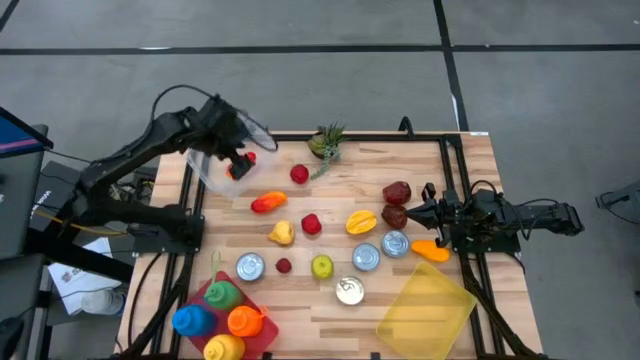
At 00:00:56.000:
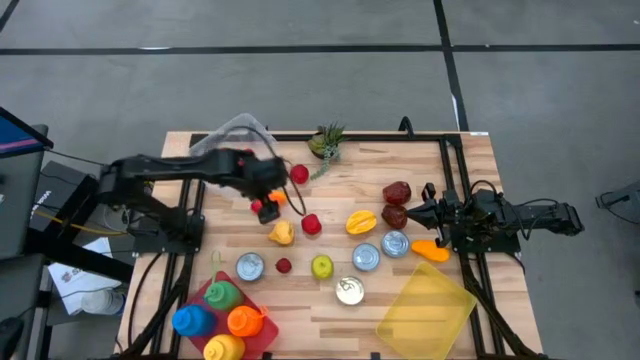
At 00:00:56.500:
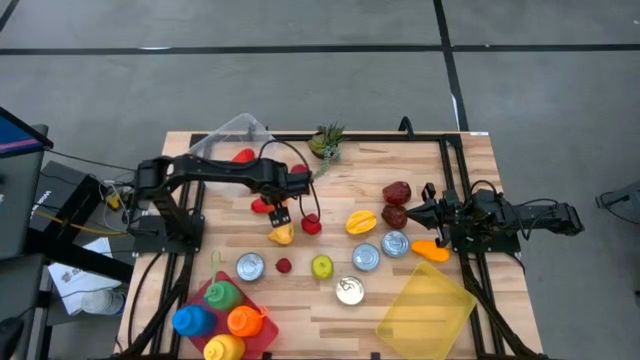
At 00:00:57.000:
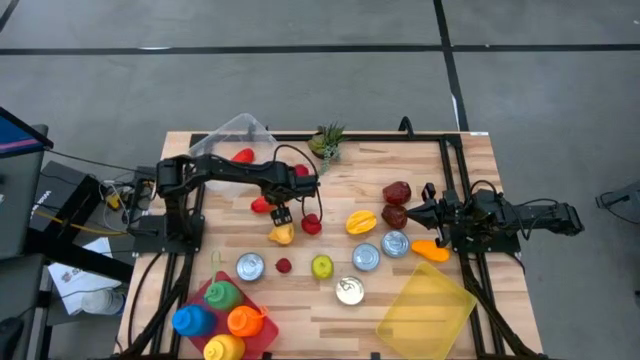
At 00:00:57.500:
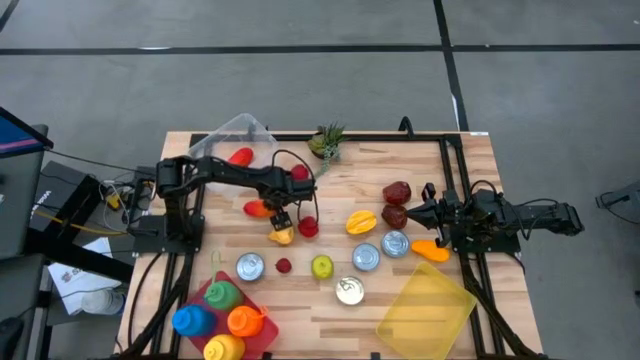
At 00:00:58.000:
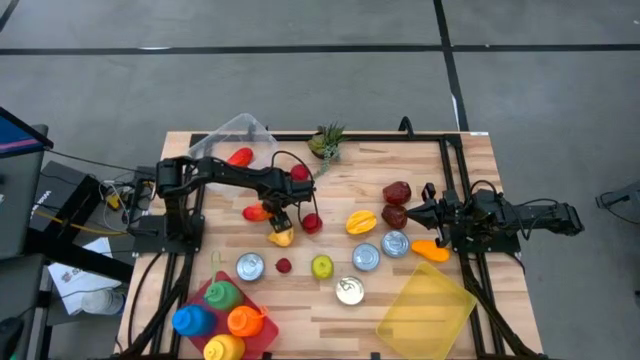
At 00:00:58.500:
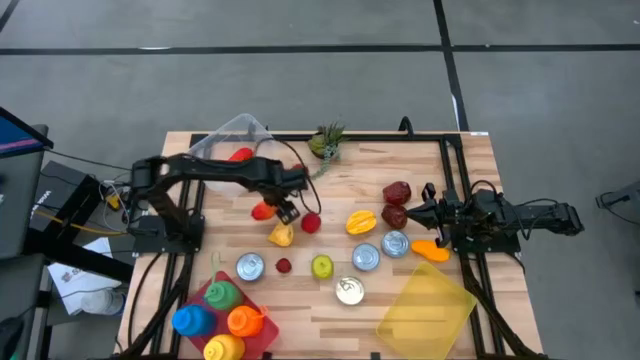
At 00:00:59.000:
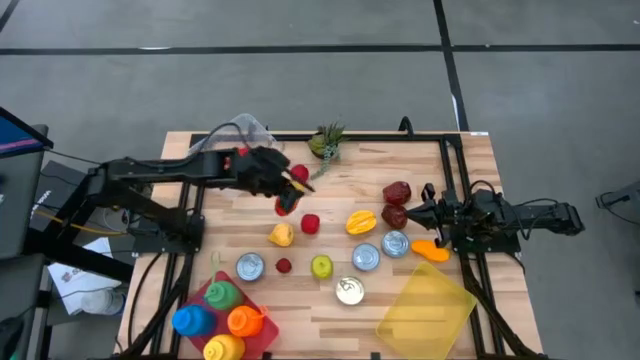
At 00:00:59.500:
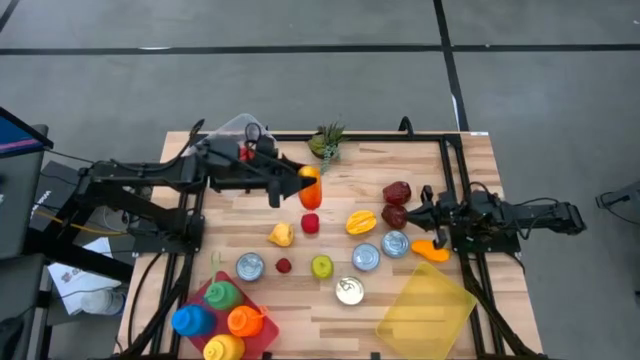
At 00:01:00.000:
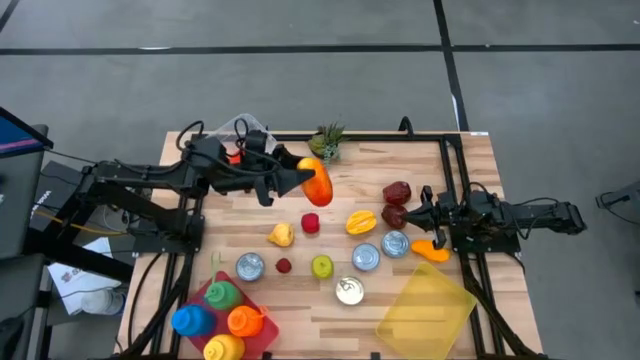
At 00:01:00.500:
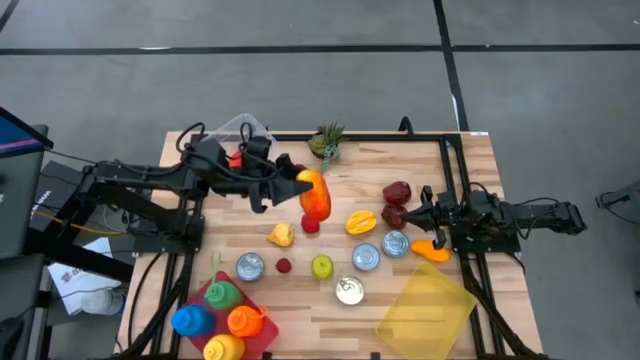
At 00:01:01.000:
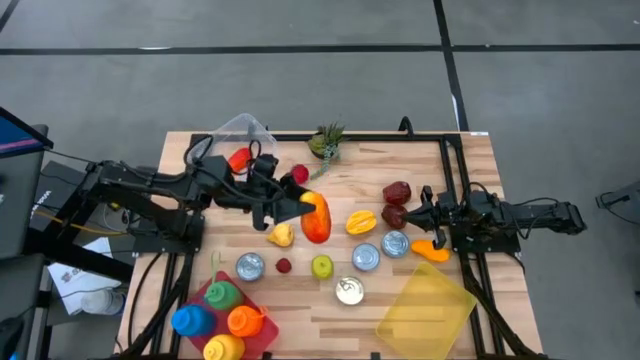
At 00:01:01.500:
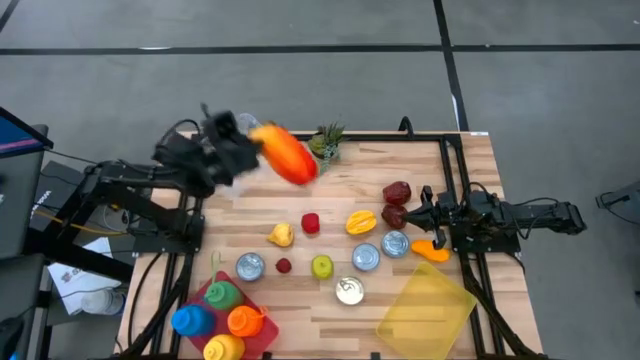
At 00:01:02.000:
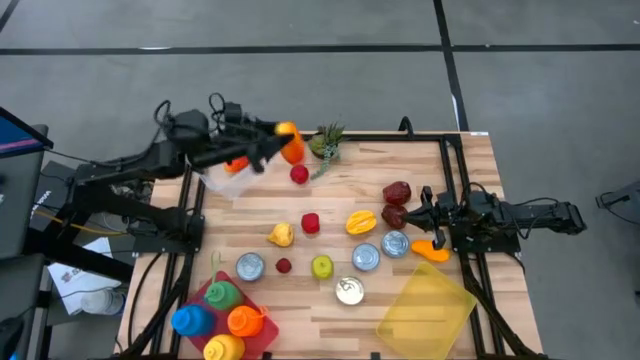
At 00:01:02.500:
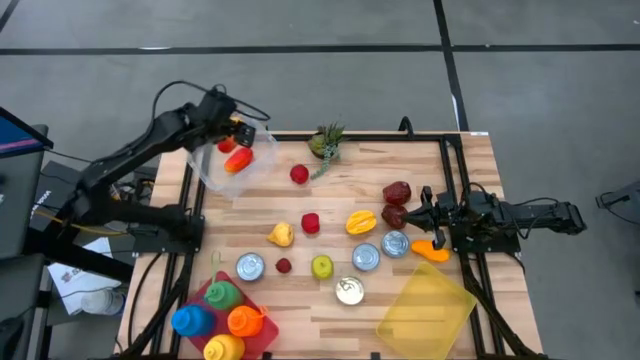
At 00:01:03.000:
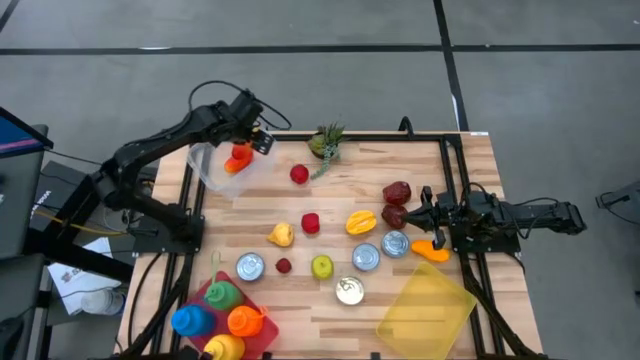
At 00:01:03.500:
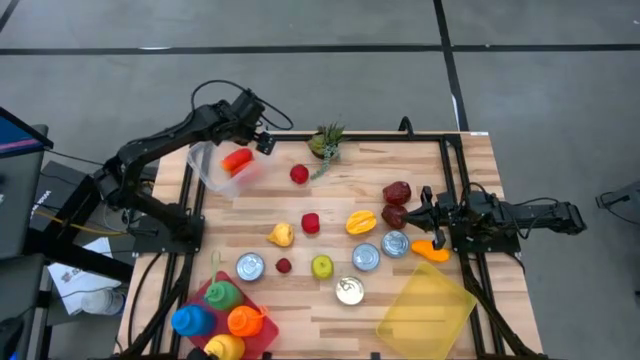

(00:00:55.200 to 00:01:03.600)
Task: Pick & Place Food Item
Put the orange red mango into the transparent bin

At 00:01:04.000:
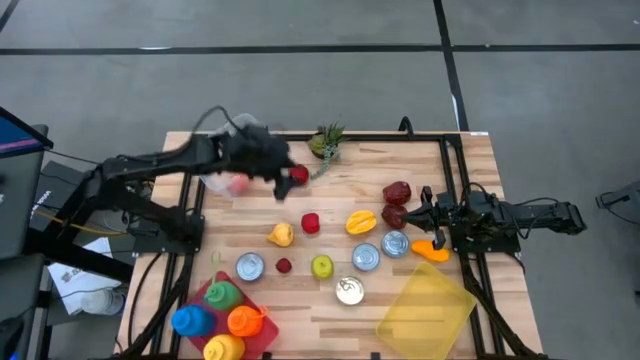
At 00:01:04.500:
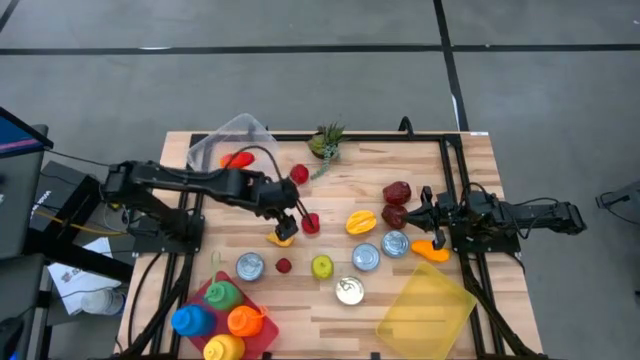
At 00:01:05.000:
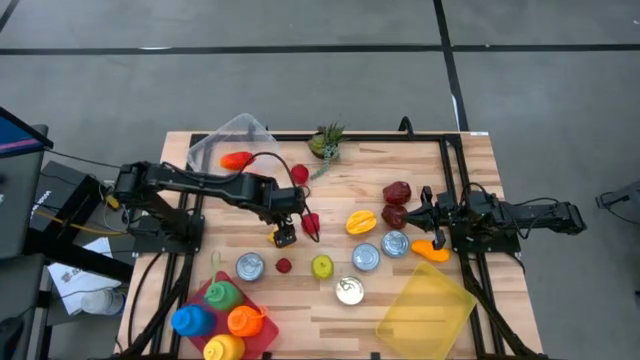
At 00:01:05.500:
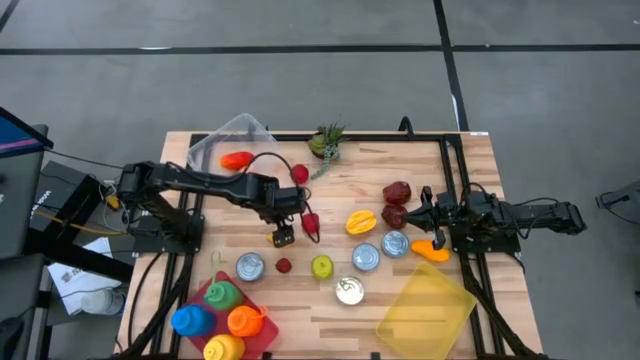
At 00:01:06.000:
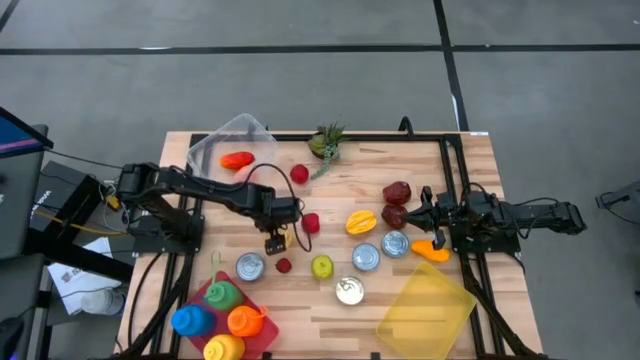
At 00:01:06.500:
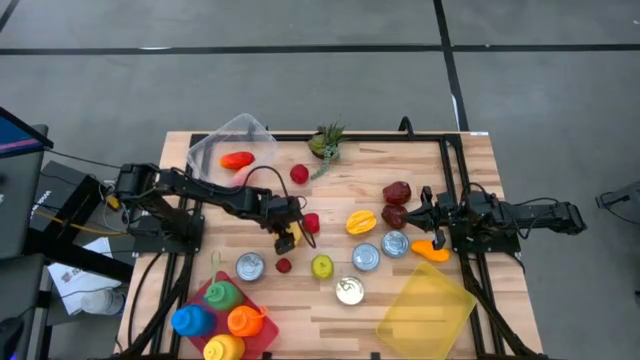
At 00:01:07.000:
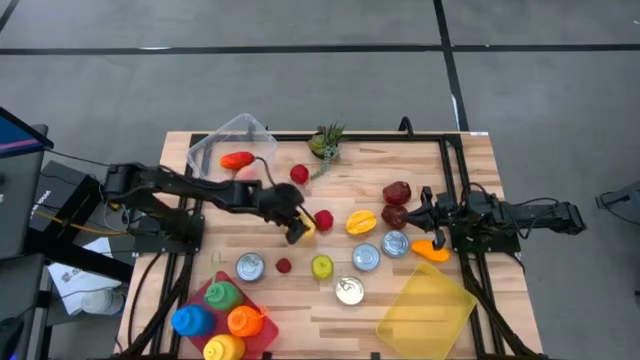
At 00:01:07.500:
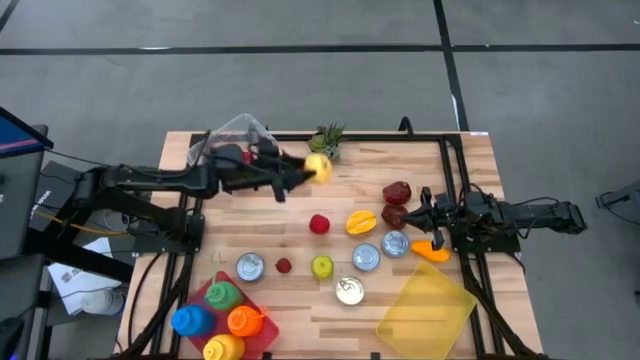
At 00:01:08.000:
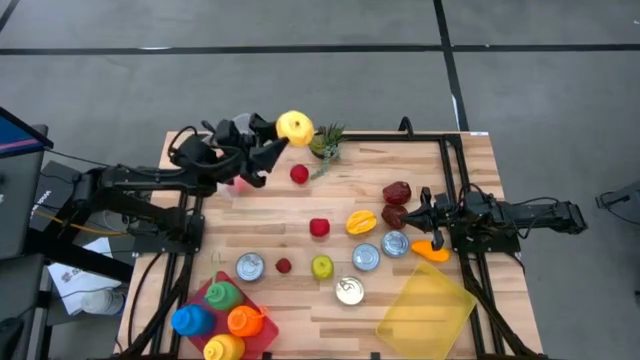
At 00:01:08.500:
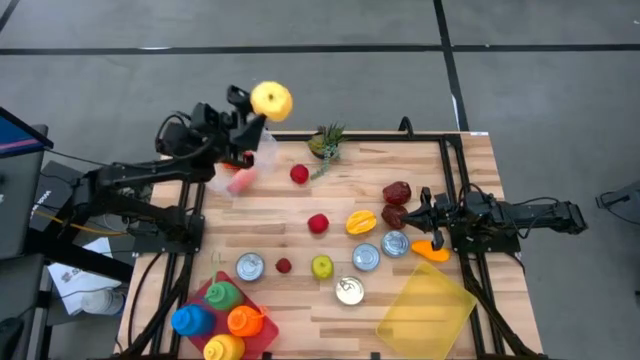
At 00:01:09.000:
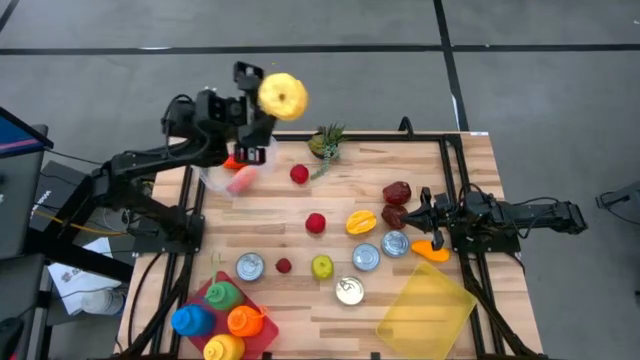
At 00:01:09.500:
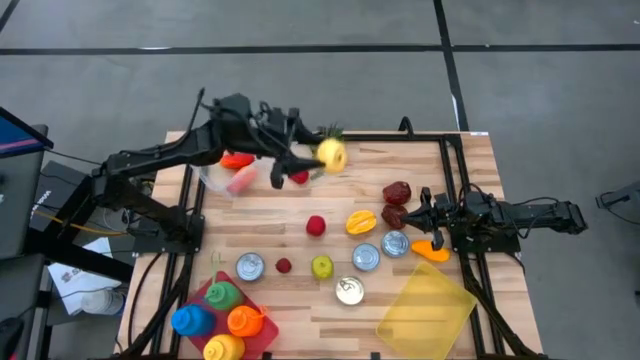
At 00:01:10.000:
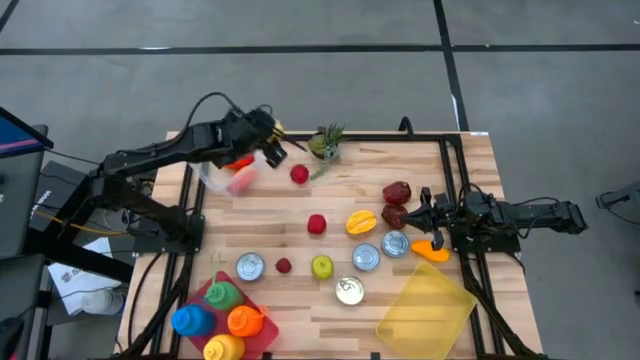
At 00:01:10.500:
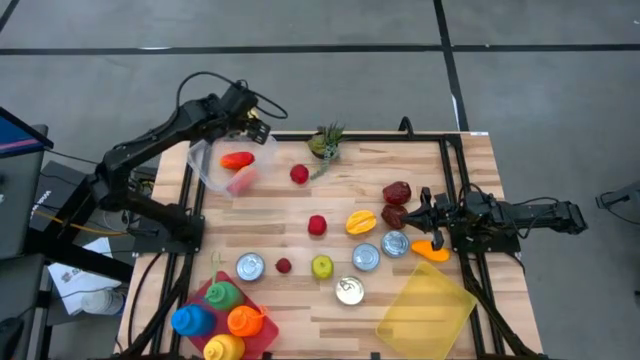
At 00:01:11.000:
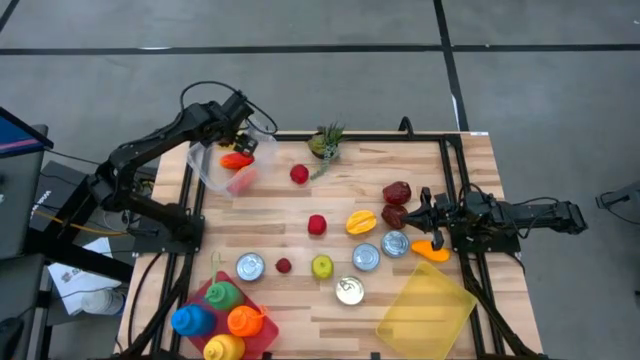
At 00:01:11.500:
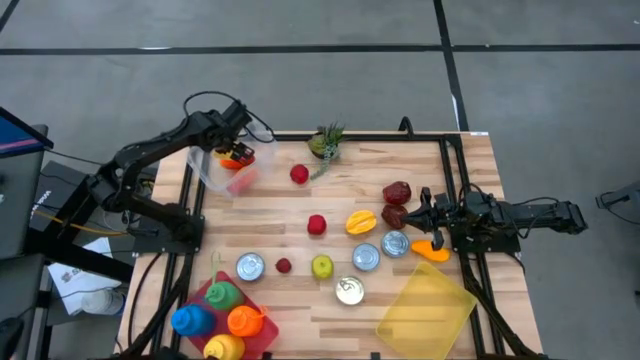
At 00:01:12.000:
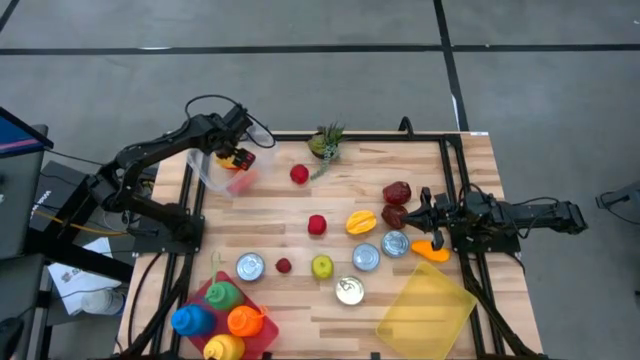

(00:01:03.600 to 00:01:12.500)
Put the yellow pear into the transparent bin

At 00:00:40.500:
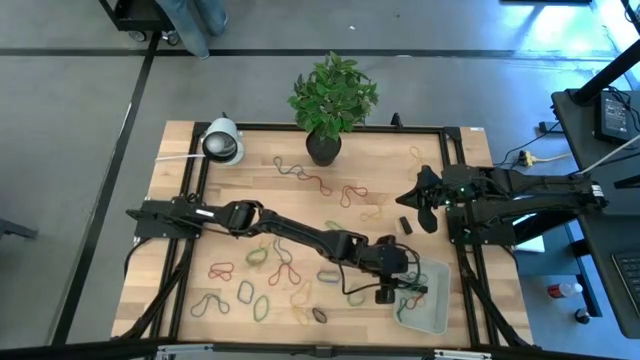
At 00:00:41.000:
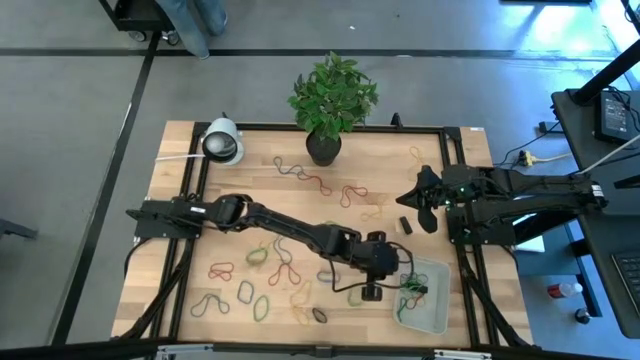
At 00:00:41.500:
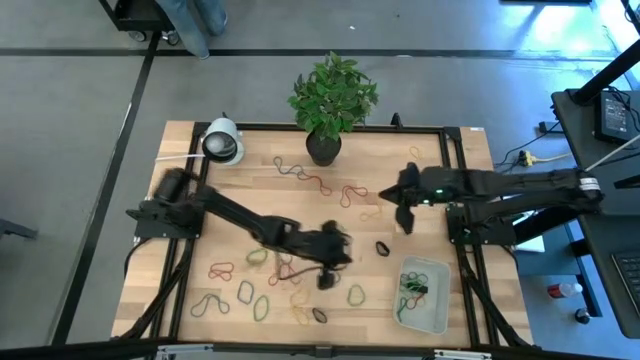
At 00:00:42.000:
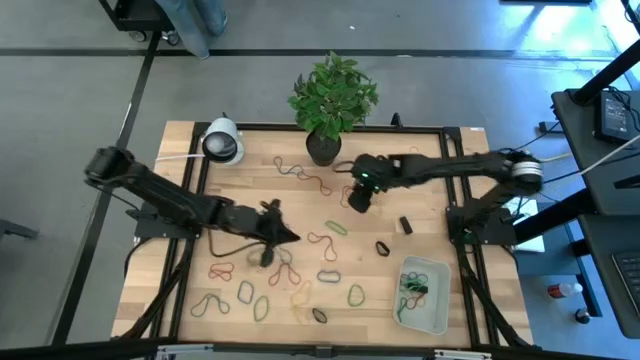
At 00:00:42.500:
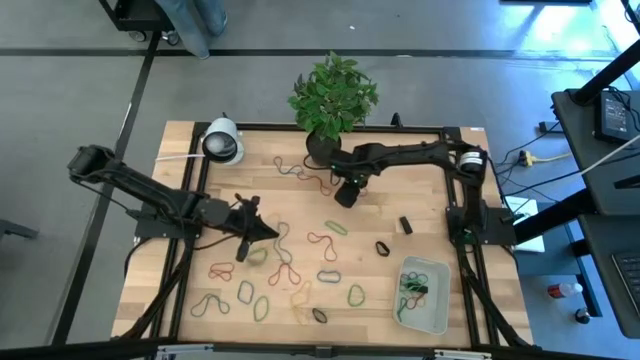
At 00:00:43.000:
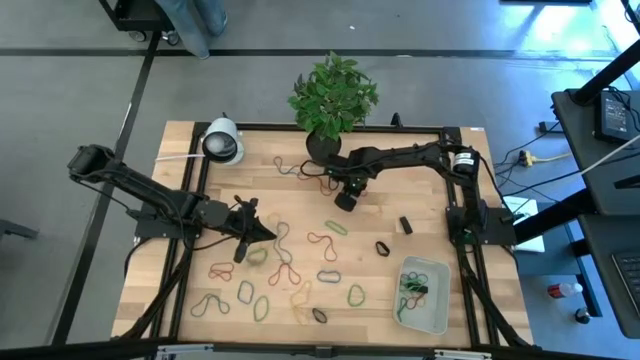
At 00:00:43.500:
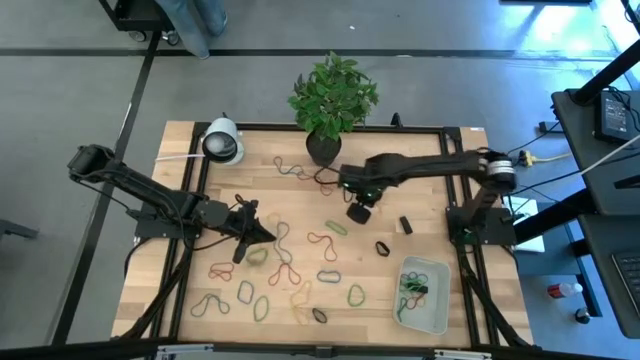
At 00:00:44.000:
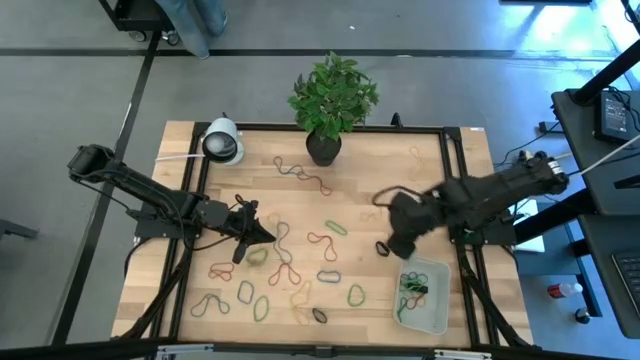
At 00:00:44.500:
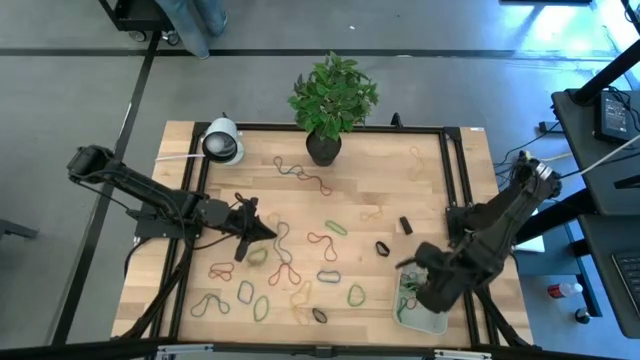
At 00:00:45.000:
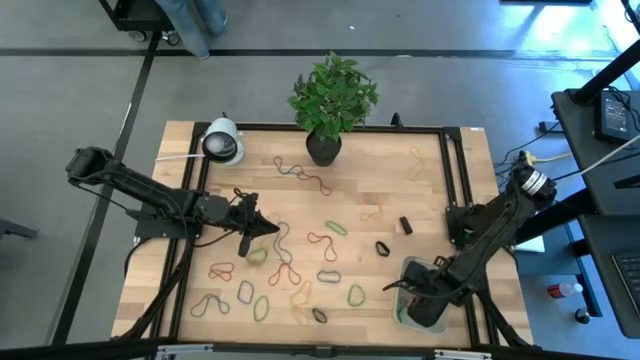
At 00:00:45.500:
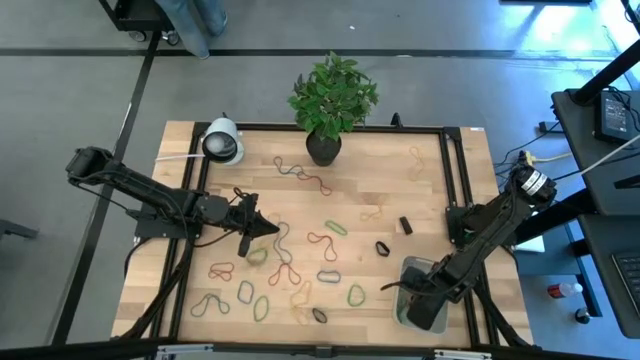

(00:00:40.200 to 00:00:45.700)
Task: Pick and place rubber bands into bin
Put the red rubber band into the gray bin
